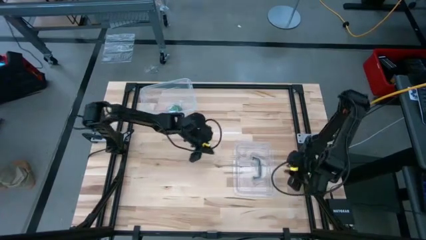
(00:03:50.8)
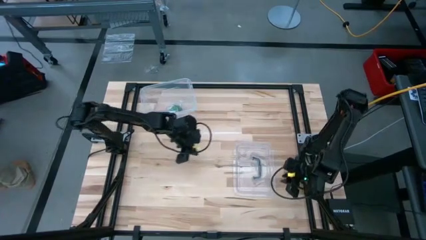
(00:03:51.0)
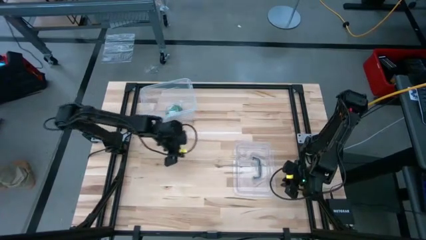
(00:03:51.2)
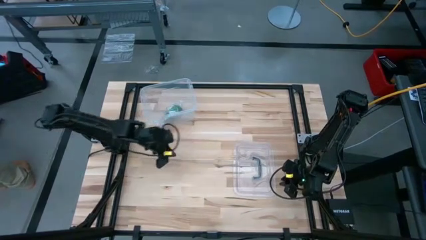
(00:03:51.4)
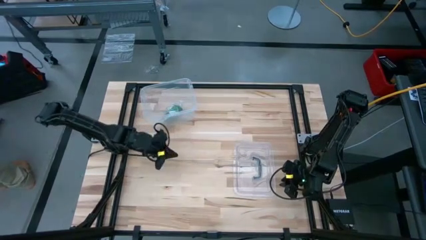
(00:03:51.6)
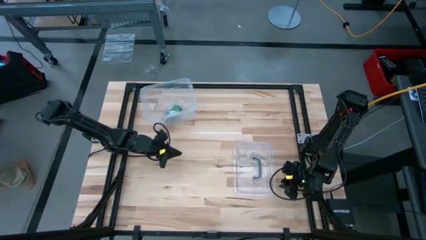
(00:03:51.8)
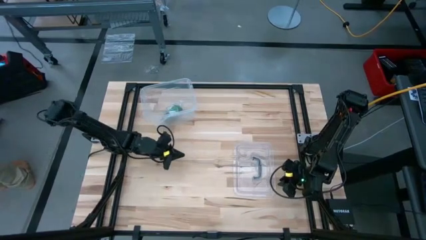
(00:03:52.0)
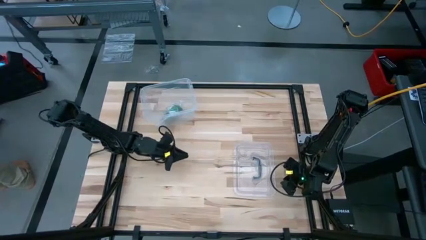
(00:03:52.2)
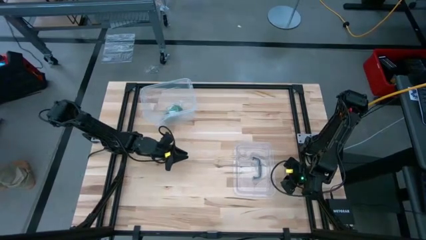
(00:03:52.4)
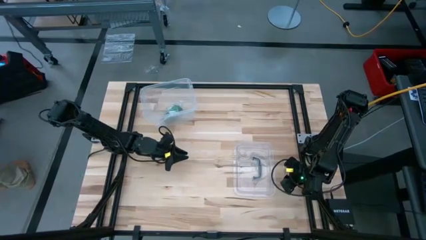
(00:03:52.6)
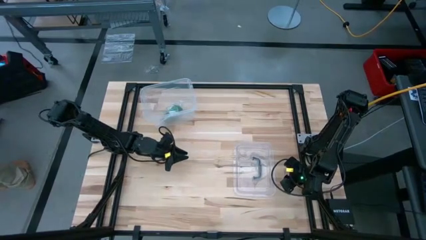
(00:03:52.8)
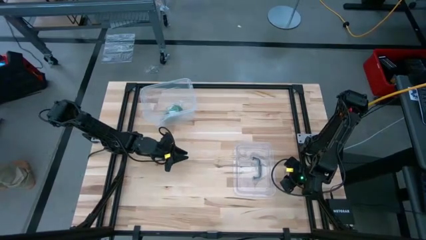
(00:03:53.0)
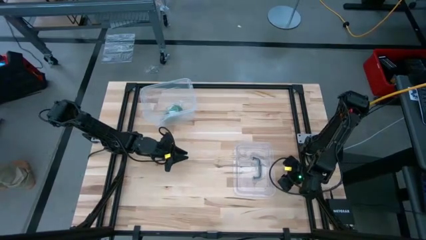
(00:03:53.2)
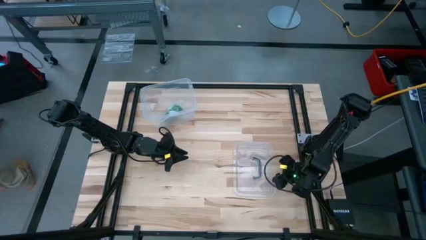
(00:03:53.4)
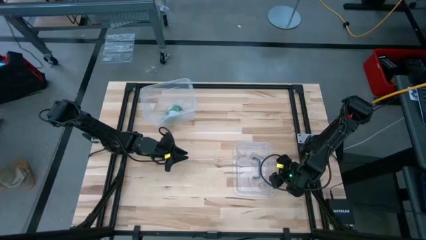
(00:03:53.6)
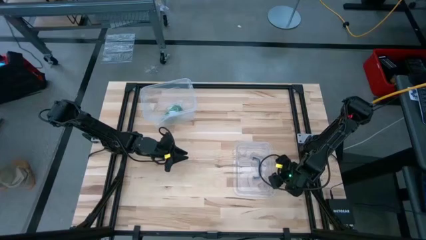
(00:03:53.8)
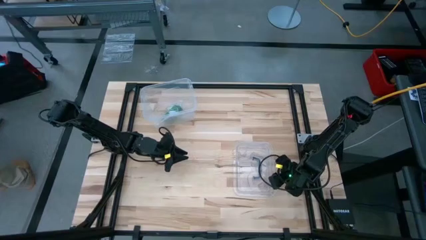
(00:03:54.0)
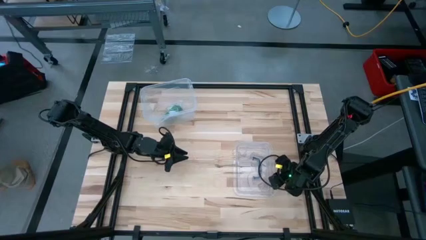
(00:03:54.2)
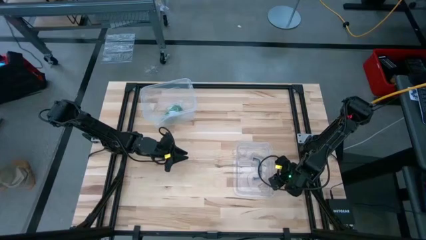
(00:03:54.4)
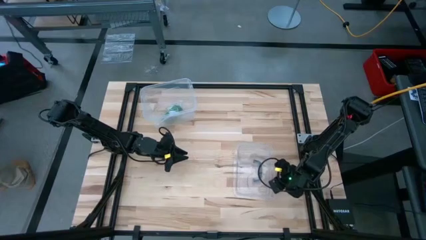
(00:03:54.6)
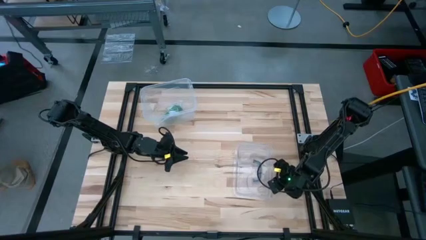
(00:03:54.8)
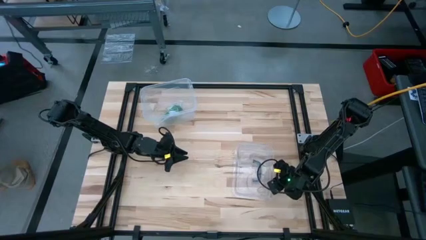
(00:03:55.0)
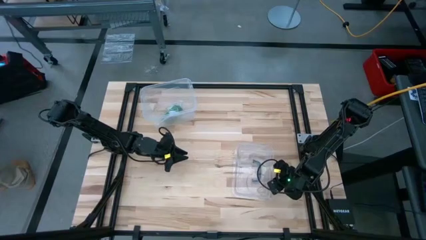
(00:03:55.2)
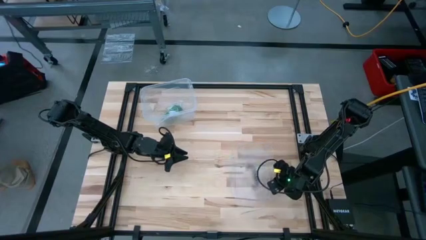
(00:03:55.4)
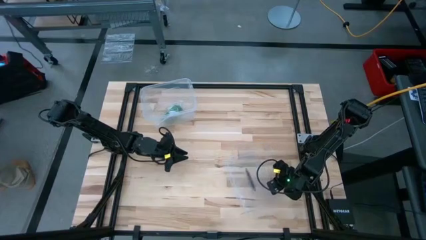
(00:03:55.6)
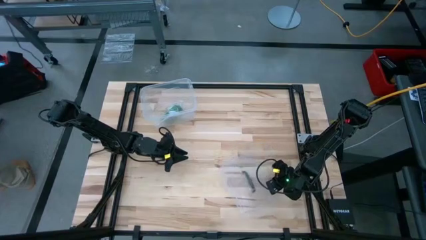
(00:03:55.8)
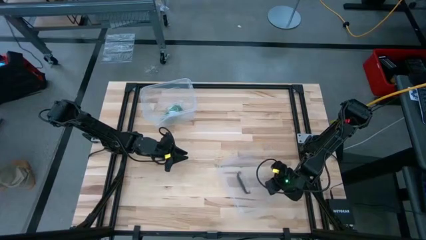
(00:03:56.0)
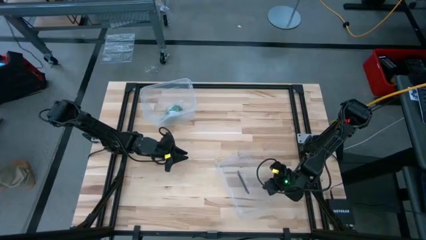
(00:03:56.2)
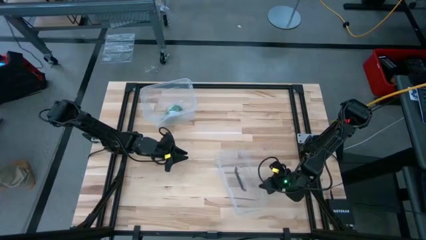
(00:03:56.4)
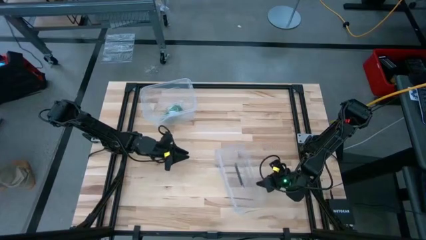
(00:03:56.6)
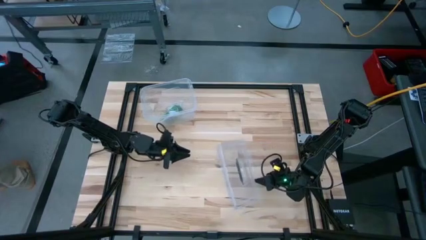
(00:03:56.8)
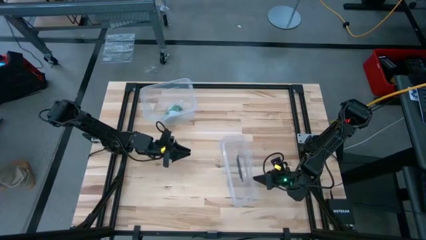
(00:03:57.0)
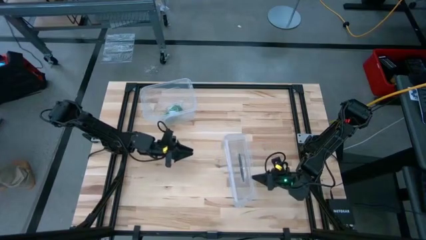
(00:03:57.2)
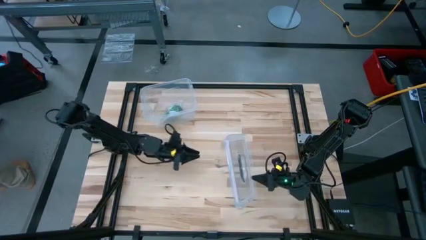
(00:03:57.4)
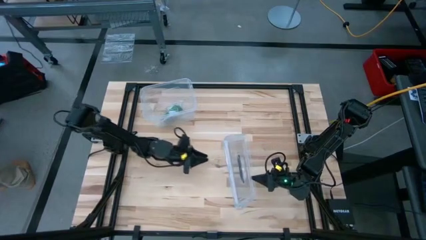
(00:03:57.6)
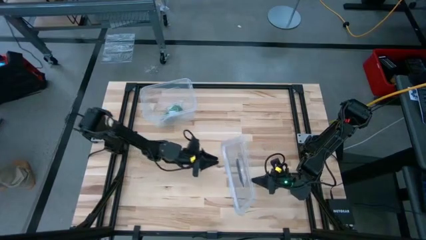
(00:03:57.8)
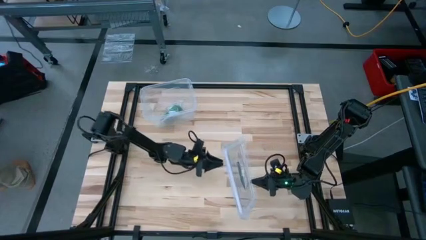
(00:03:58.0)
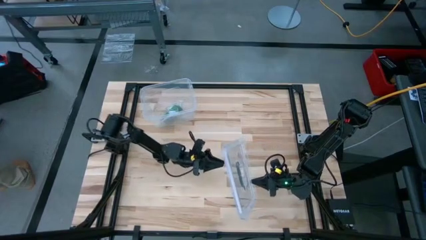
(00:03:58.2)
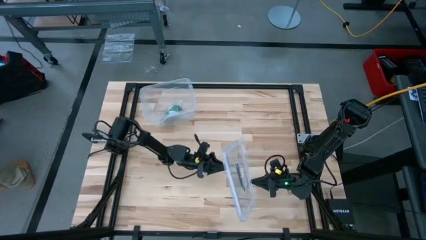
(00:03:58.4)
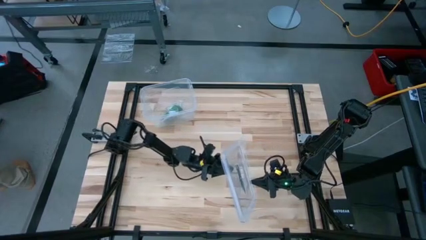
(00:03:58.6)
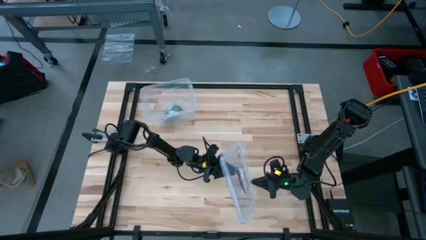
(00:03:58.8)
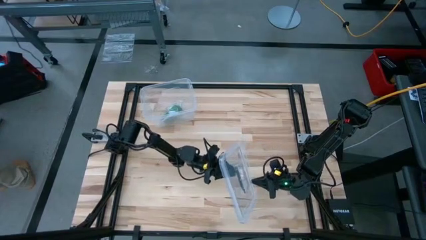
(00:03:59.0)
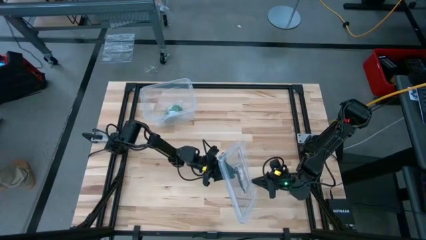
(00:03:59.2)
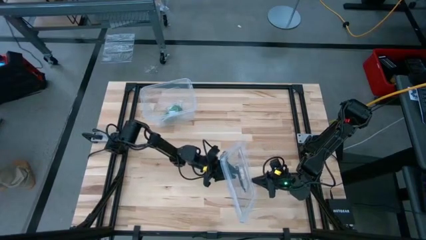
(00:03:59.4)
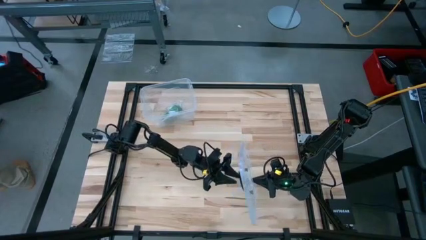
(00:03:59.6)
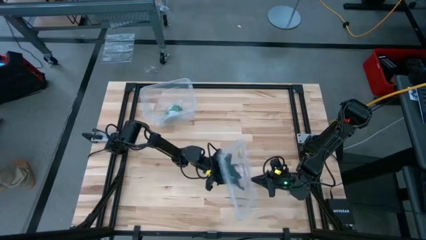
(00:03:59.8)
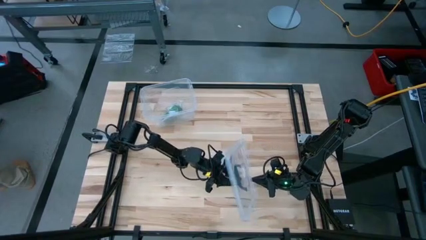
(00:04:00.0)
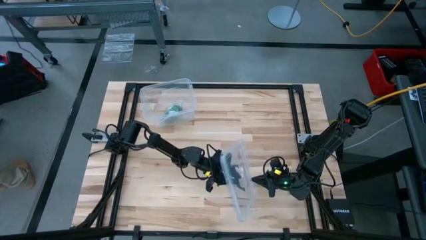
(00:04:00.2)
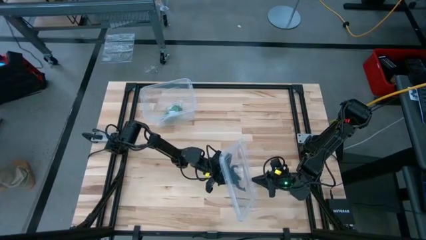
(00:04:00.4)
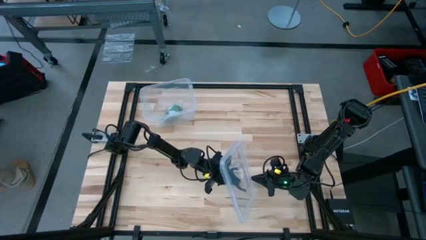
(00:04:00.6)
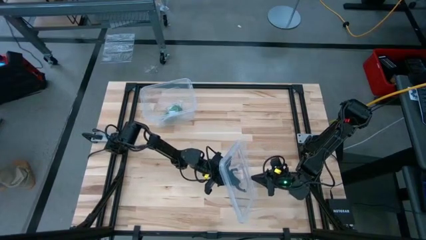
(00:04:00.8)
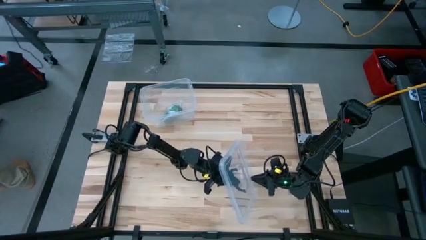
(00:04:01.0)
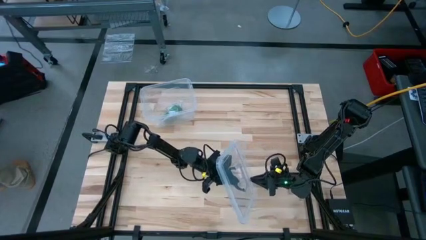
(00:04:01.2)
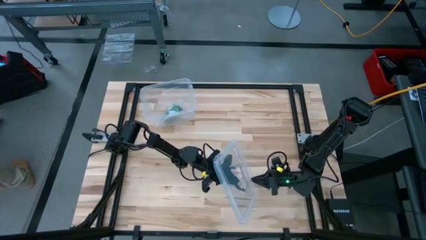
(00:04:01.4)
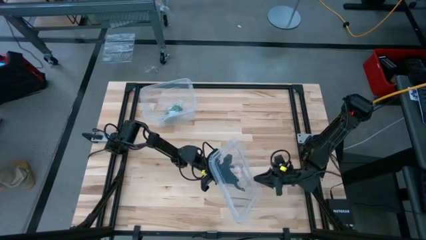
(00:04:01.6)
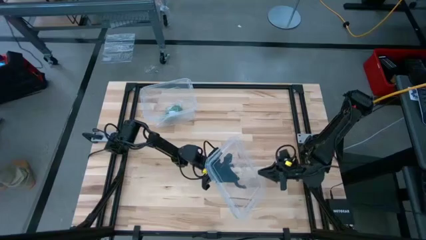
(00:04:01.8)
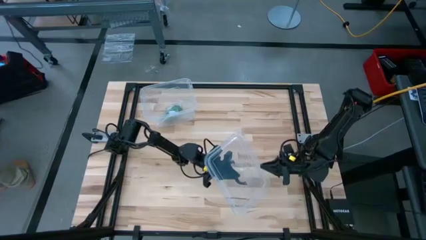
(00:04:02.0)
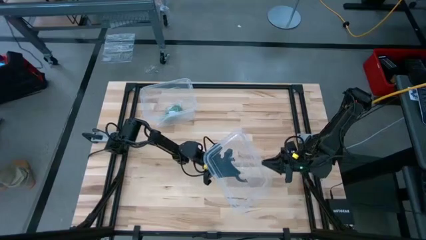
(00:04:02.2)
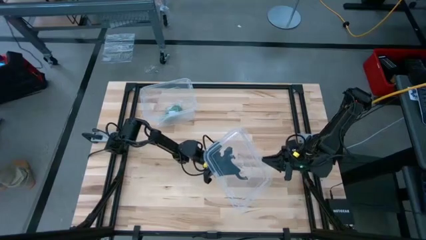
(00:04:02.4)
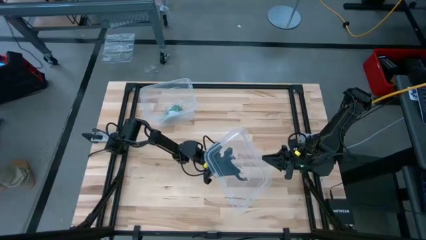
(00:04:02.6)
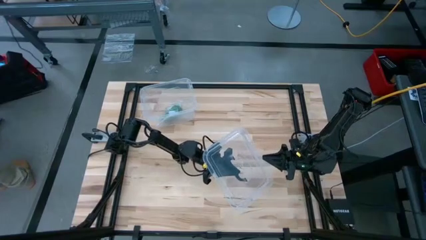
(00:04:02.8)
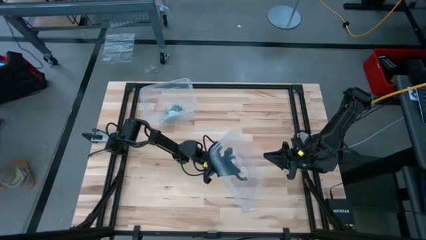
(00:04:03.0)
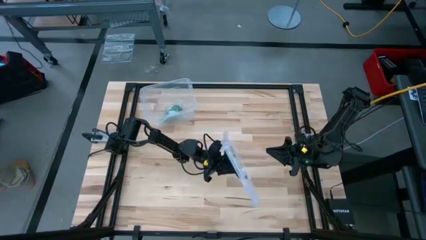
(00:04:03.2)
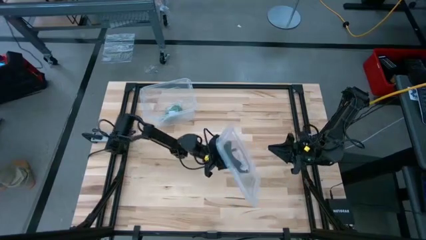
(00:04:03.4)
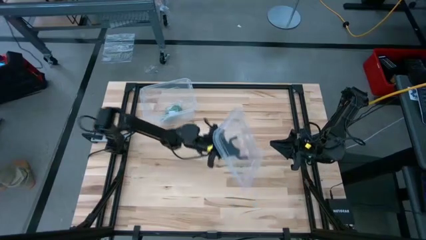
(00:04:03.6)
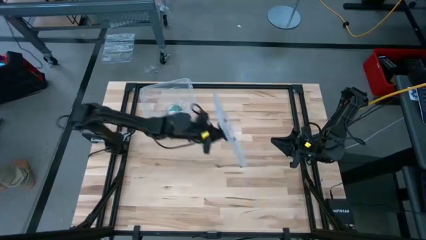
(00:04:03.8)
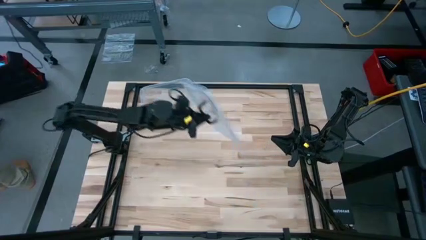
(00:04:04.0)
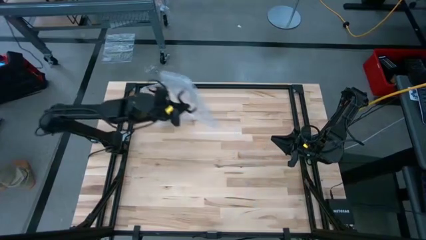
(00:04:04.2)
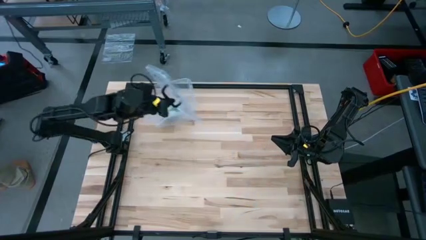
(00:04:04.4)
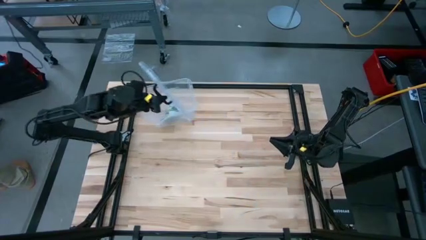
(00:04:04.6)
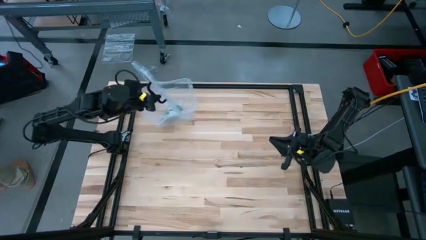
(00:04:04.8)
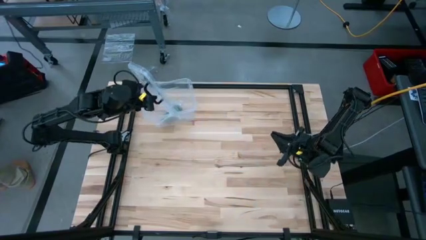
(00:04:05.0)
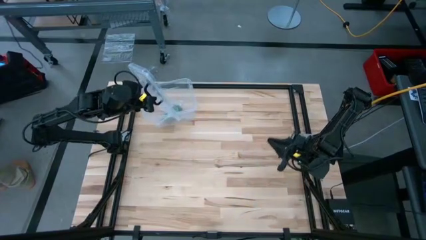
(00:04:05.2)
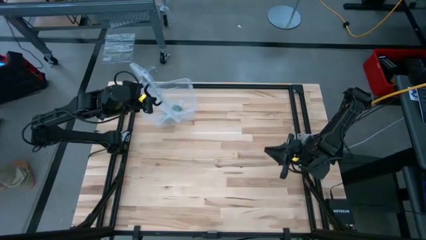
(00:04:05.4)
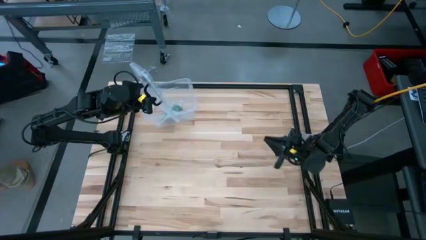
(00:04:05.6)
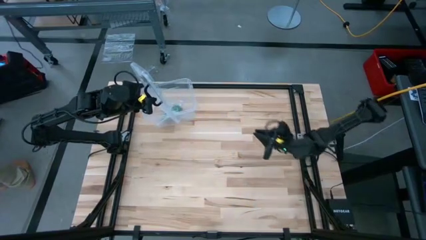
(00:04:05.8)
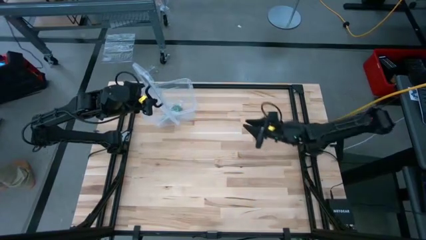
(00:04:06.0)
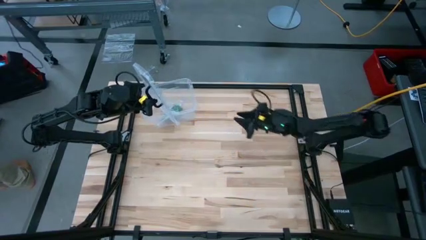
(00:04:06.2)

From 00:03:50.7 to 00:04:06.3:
Task: Roll bandage
Close the transparent bin with the transparent bin cover
